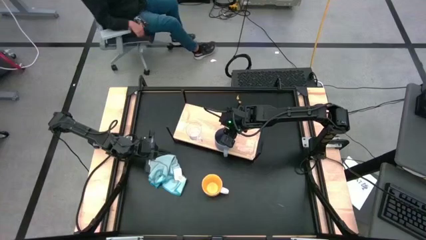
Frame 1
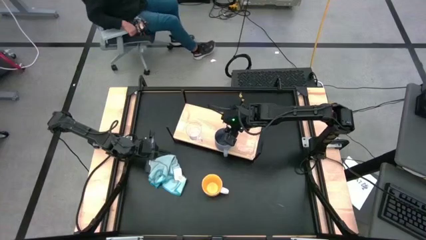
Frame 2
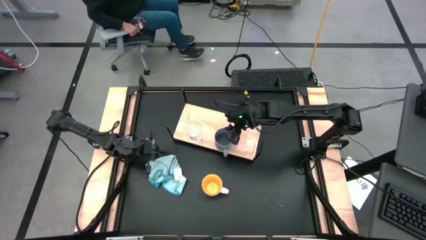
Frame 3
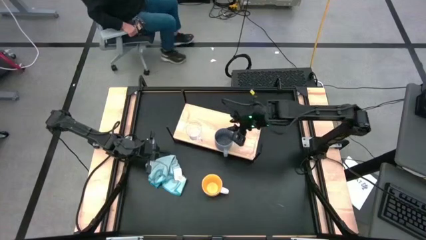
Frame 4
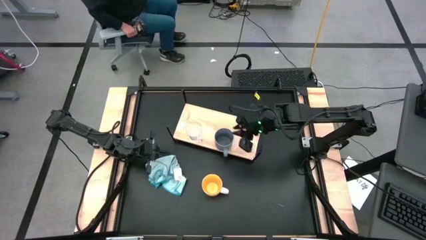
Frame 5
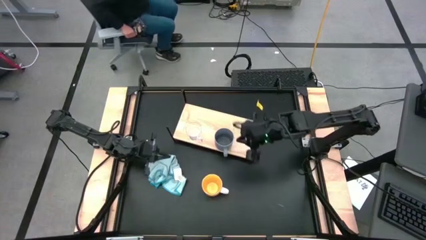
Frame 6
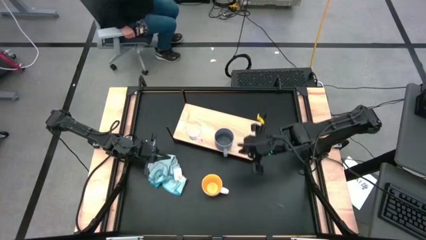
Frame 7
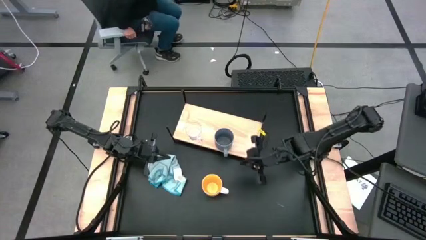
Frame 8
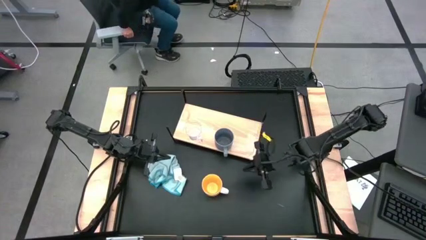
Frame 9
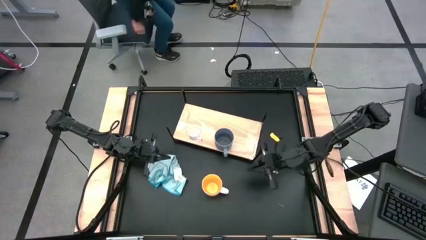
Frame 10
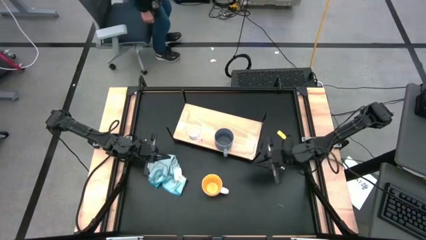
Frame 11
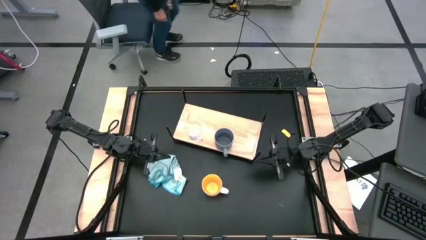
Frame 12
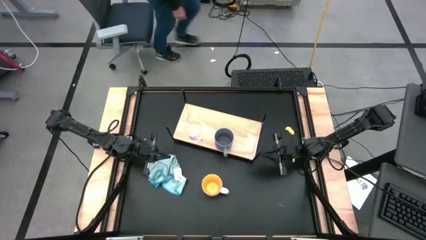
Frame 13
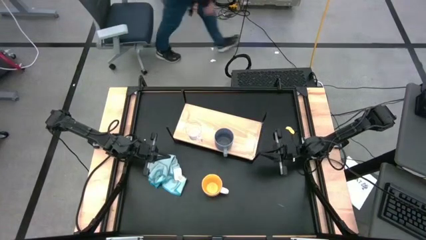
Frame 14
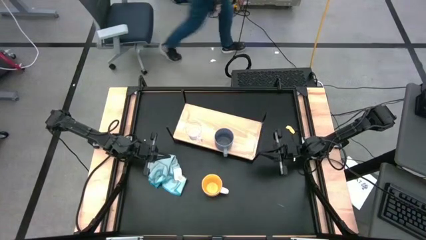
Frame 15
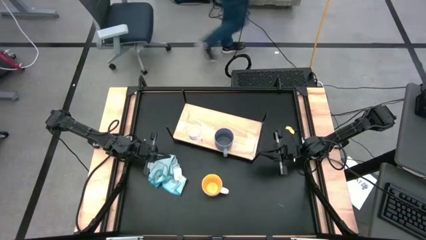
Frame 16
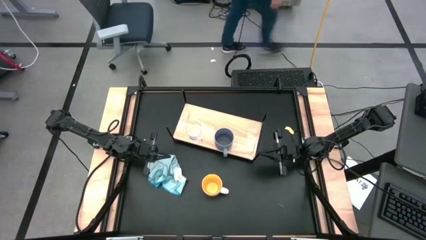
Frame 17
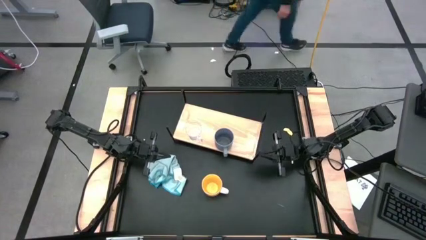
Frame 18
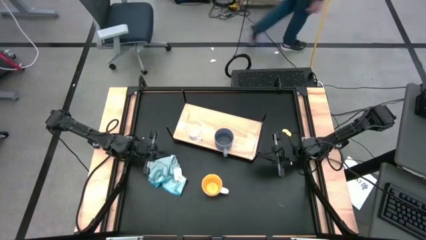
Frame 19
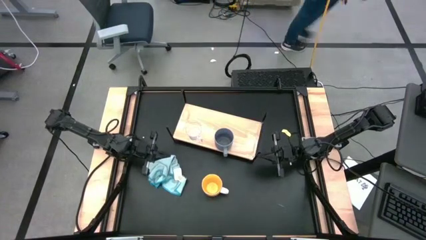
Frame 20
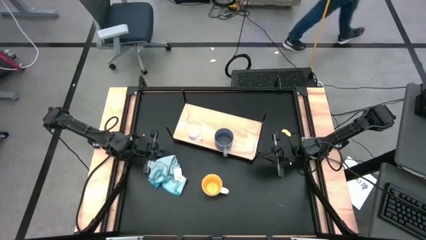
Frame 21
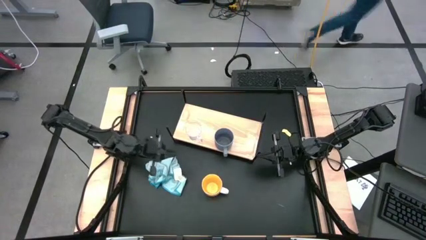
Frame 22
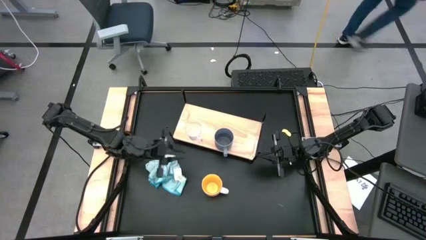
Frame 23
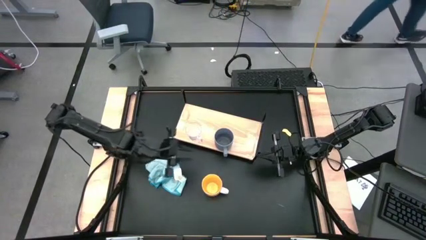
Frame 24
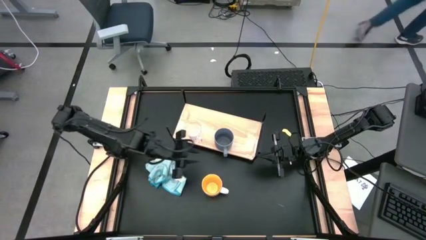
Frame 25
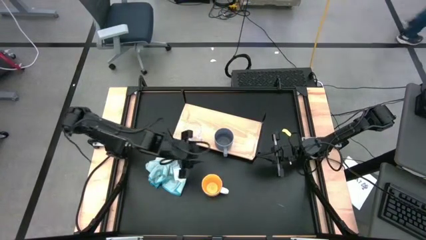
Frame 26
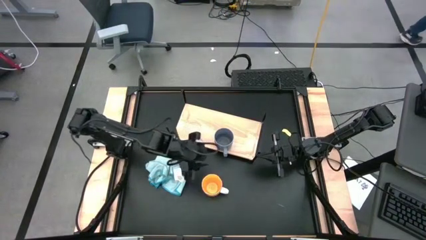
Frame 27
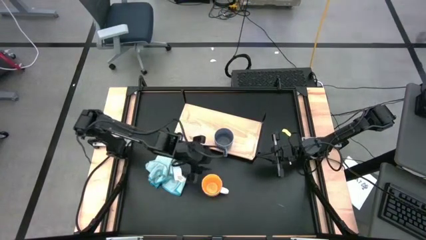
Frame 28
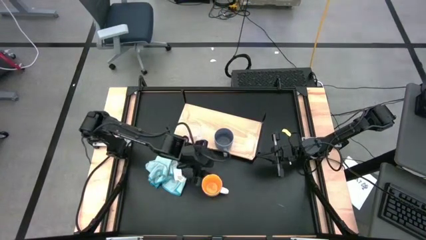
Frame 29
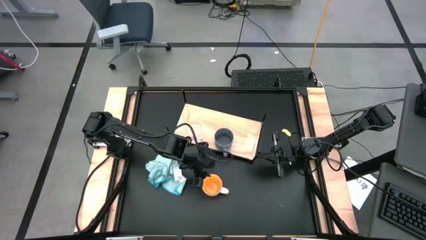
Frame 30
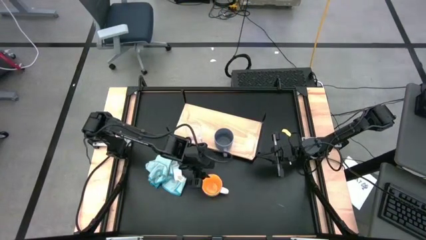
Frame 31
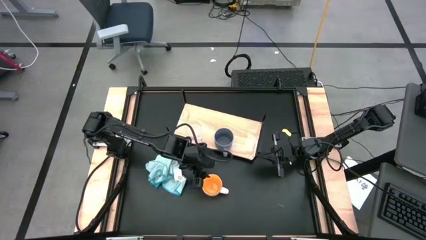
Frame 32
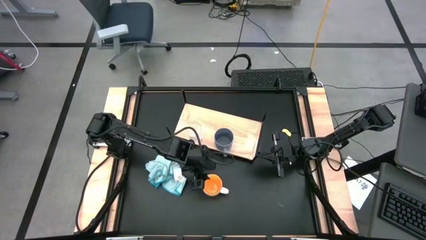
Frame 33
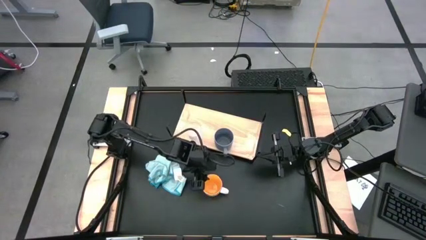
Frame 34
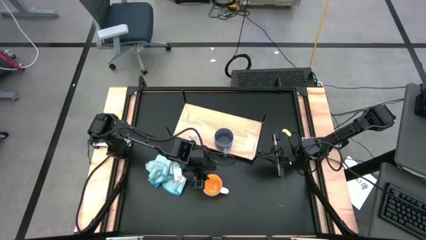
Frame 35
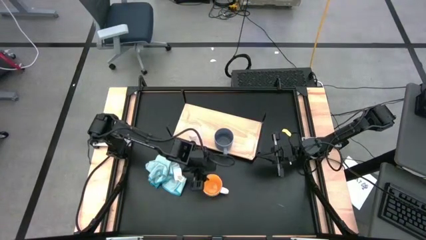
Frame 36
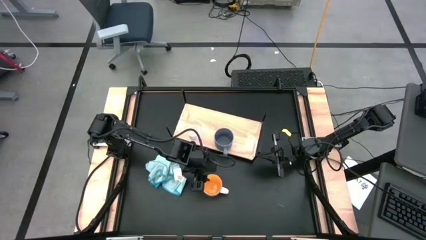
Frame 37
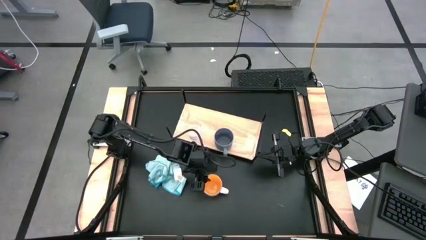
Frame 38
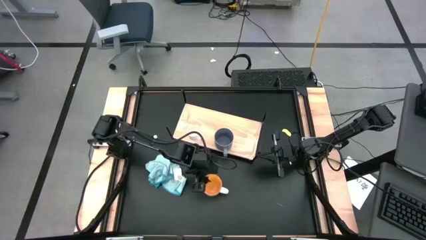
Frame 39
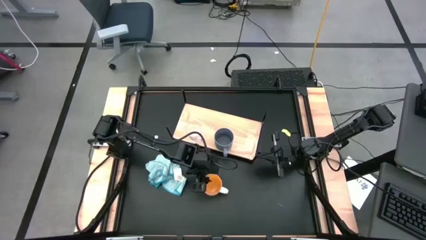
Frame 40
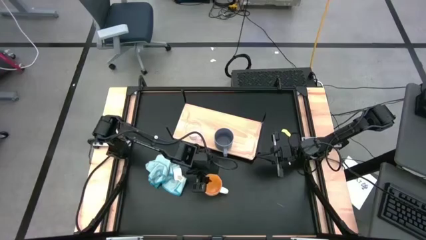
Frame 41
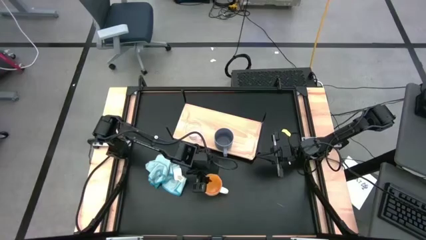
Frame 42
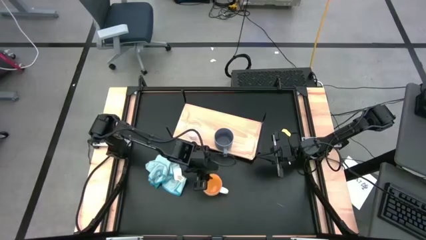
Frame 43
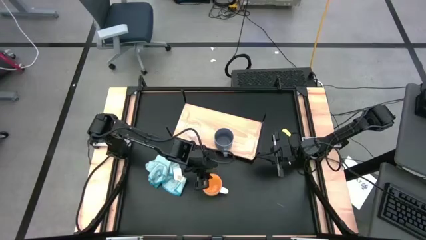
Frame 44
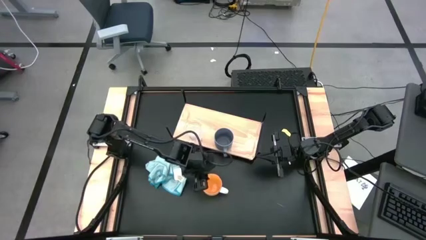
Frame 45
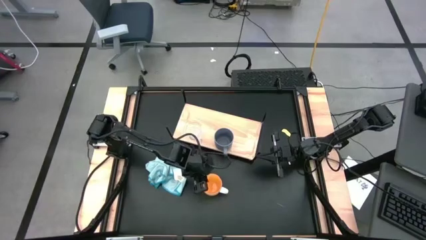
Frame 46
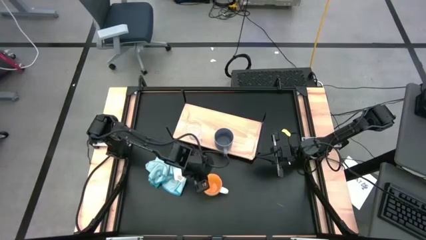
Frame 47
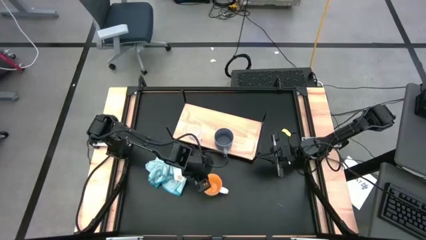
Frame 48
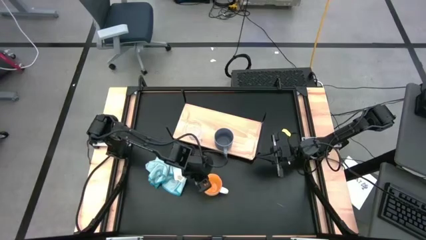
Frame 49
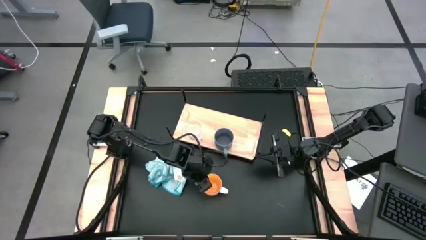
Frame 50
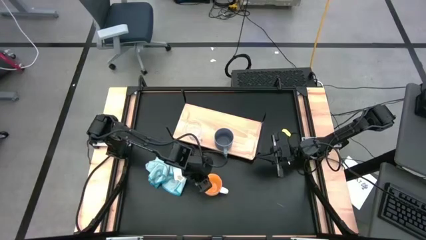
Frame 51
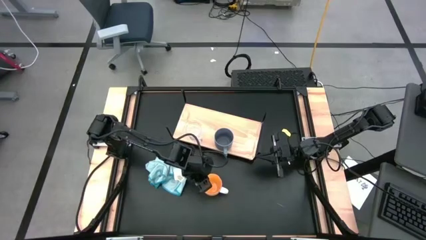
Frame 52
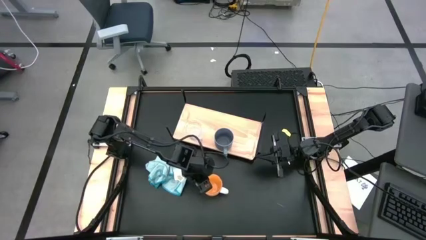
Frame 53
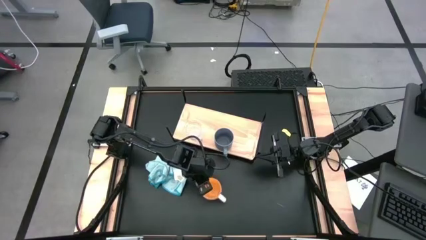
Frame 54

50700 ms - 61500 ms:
Task: Stack small to large cups/mugs on shelf
Put the yellow mug on the shelf

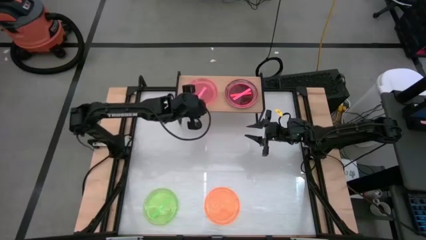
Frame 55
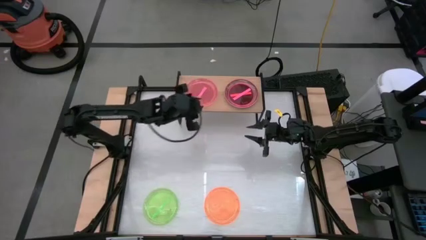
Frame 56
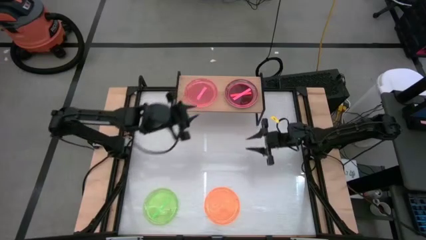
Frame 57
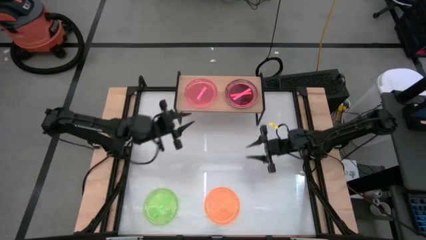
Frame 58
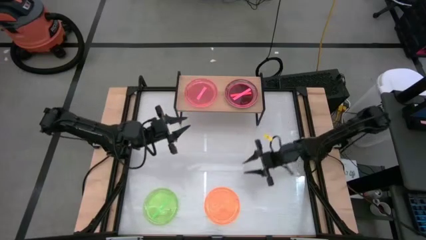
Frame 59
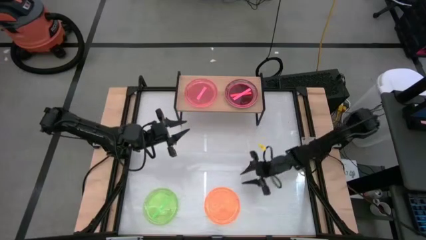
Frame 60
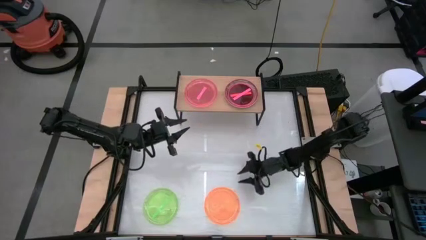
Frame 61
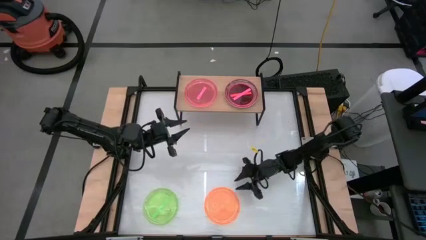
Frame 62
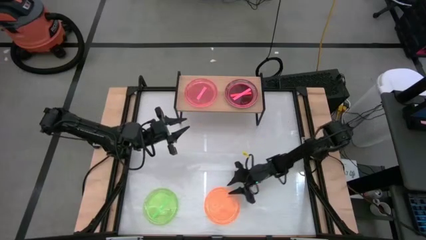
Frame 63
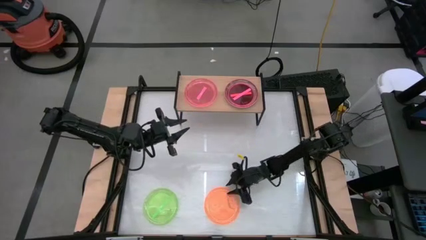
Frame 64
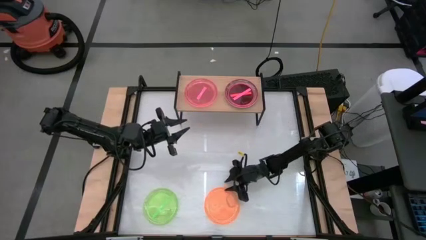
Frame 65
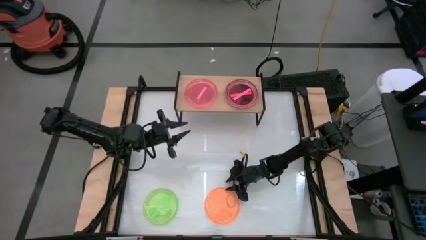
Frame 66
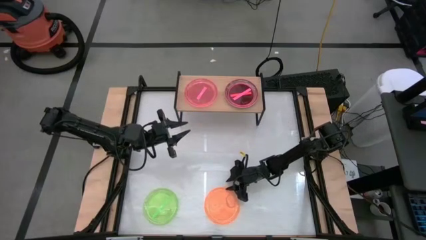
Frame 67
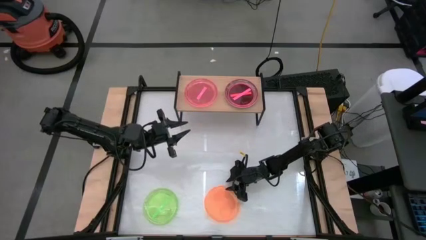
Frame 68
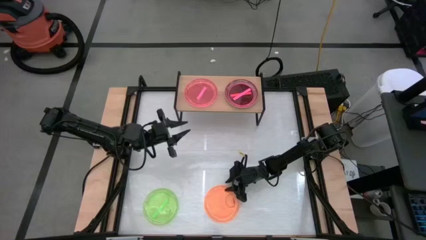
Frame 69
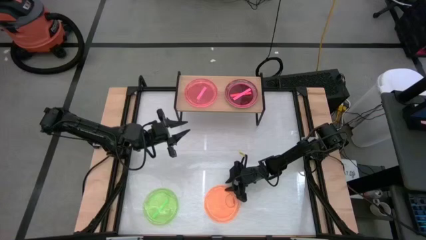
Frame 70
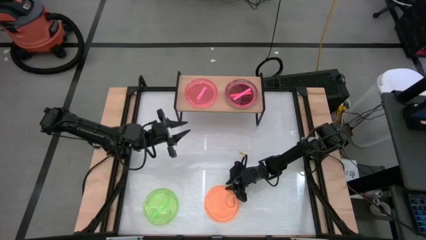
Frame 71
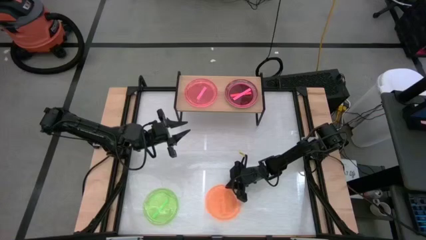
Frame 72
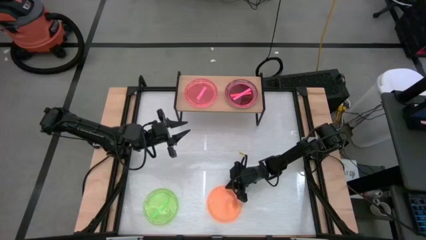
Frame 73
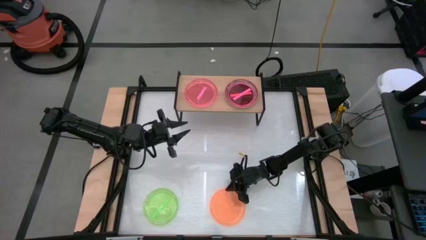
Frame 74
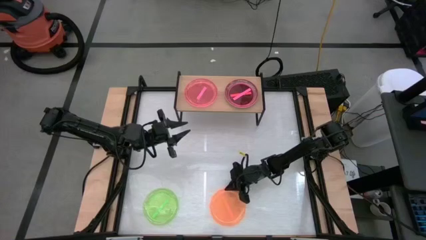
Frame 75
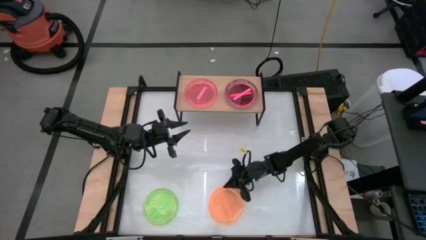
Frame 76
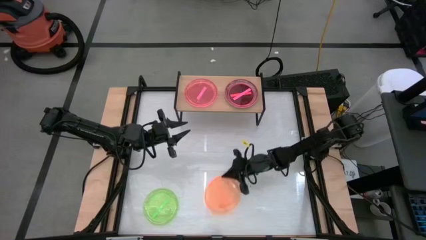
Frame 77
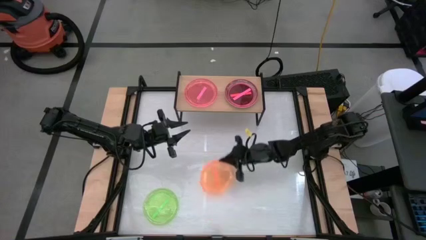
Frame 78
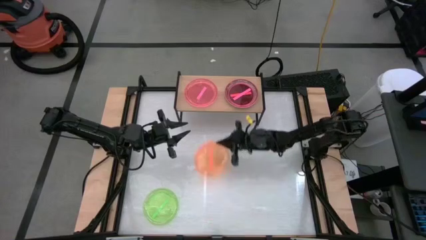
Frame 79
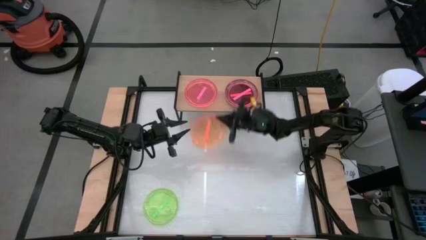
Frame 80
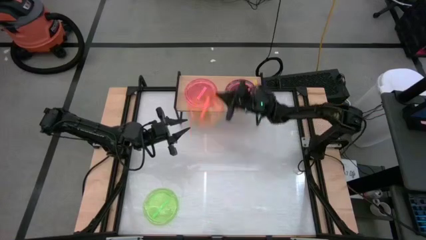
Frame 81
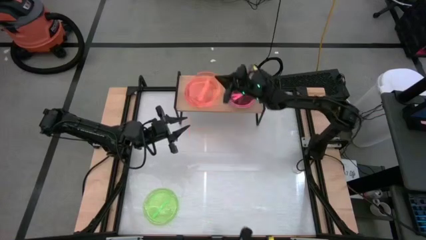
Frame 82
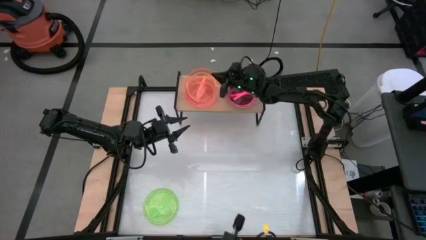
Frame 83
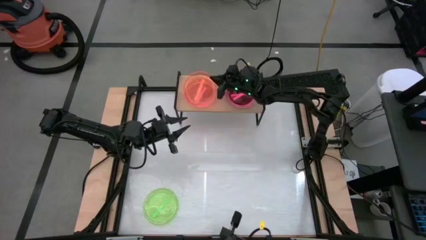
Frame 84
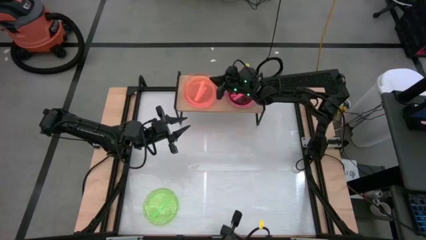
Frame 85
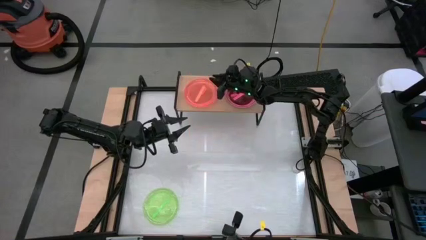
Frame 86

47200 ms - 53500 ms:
Task: Place and stack plates onto a shelf
Stack the bottom orange plate on the pink plate on the shelf
